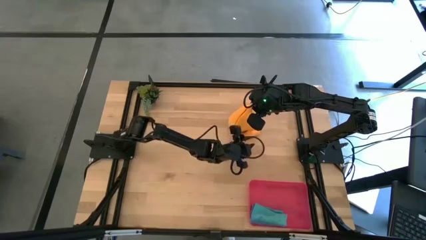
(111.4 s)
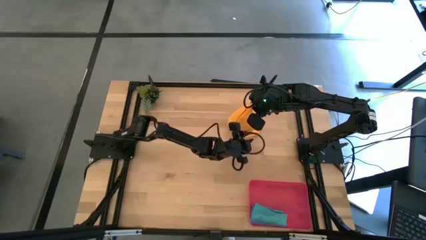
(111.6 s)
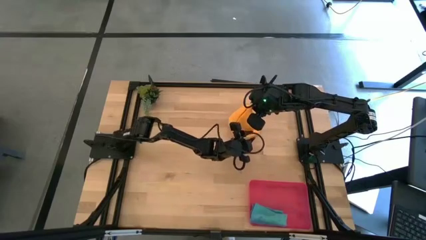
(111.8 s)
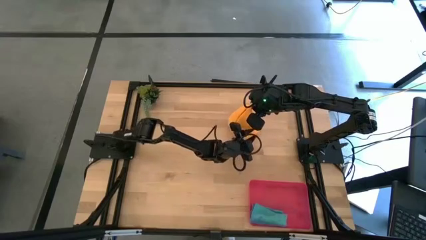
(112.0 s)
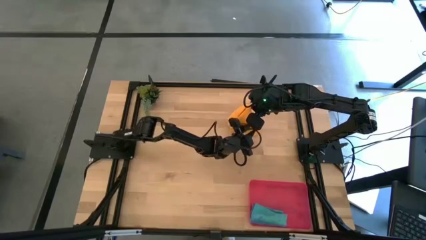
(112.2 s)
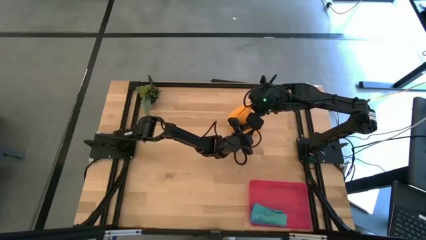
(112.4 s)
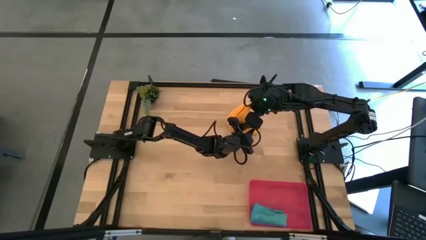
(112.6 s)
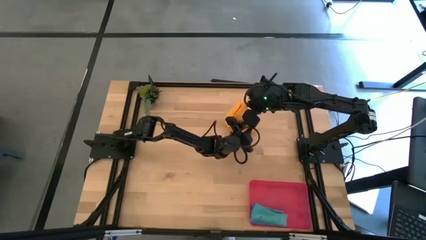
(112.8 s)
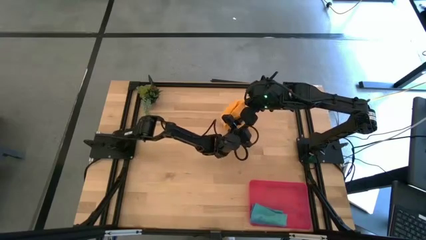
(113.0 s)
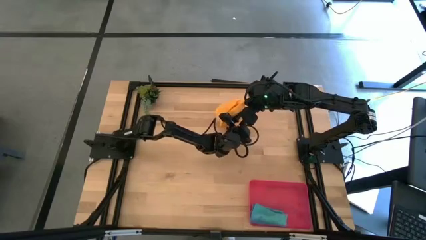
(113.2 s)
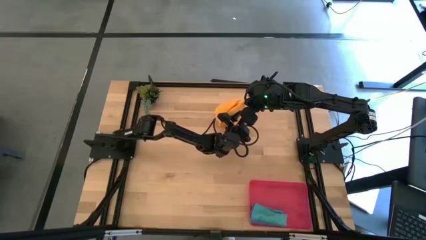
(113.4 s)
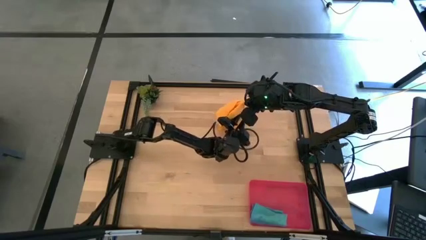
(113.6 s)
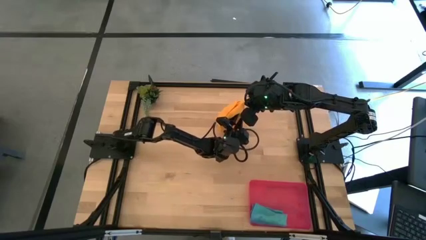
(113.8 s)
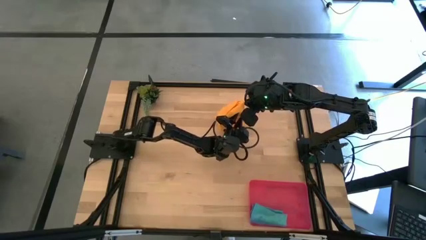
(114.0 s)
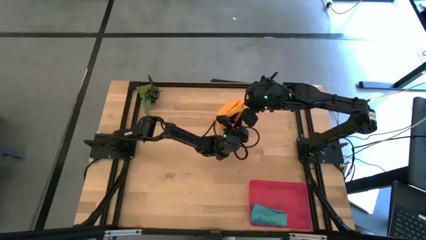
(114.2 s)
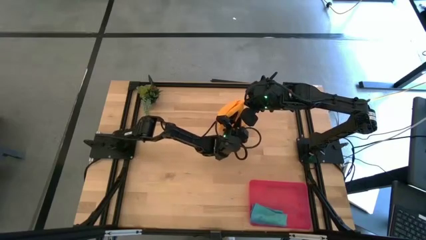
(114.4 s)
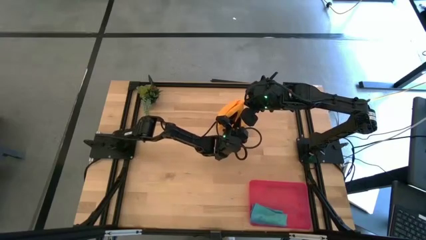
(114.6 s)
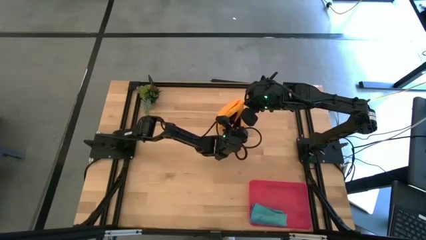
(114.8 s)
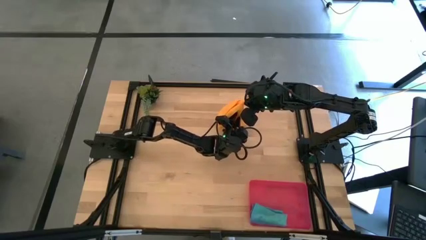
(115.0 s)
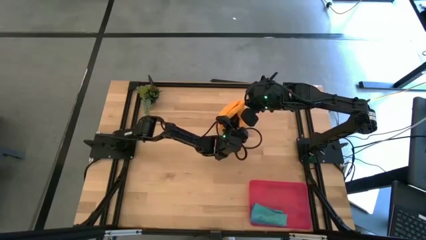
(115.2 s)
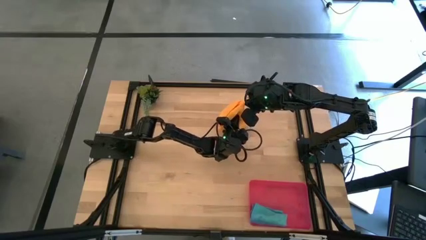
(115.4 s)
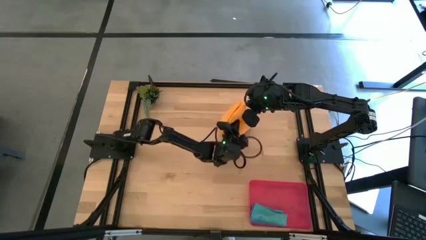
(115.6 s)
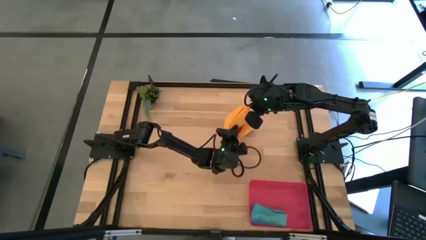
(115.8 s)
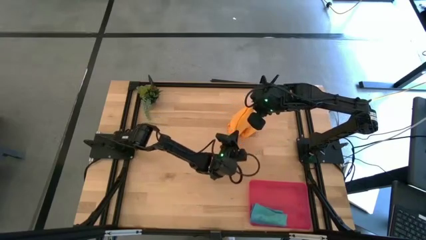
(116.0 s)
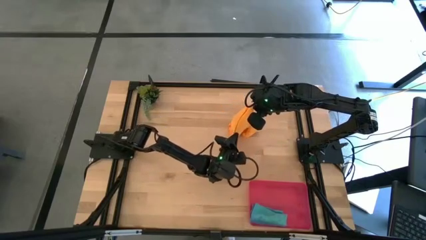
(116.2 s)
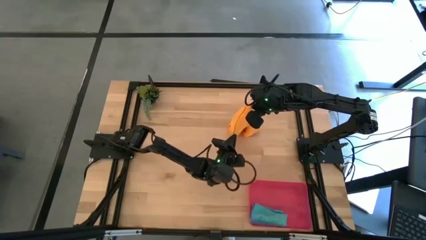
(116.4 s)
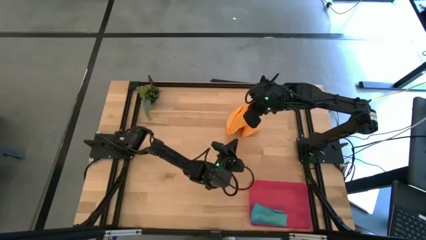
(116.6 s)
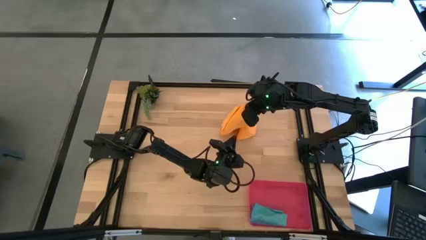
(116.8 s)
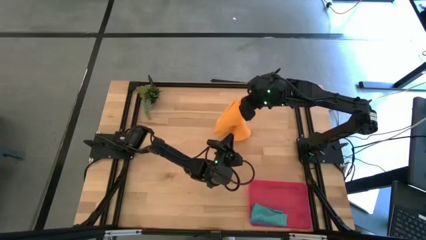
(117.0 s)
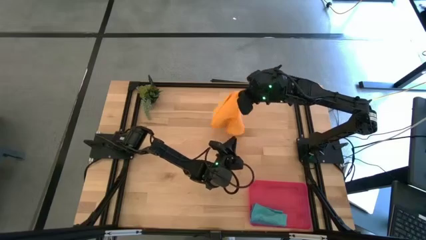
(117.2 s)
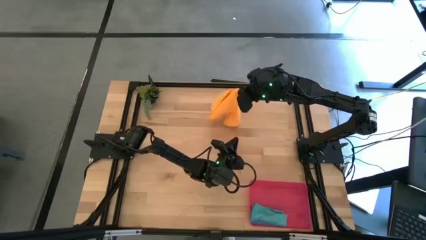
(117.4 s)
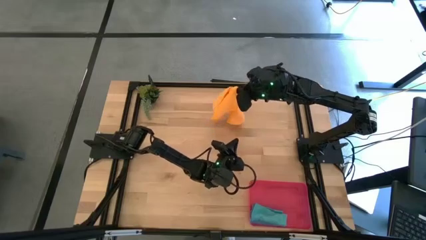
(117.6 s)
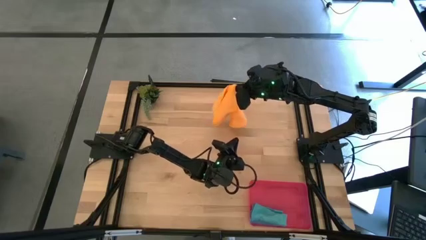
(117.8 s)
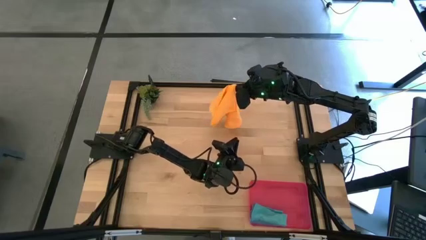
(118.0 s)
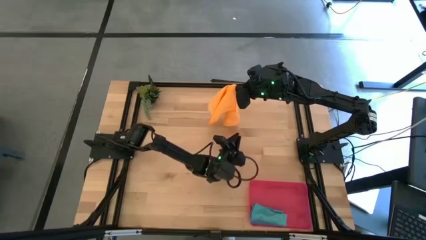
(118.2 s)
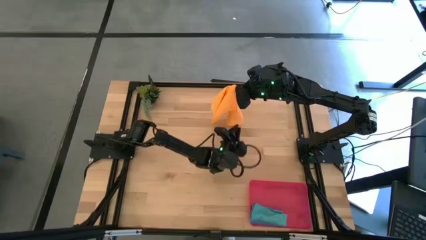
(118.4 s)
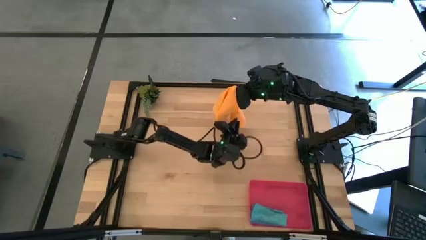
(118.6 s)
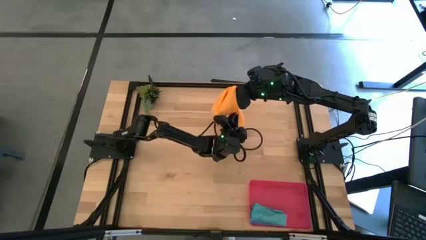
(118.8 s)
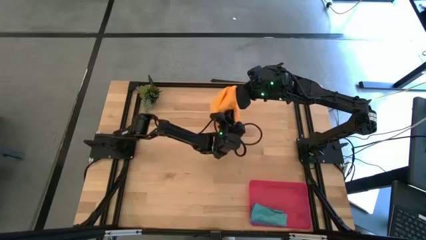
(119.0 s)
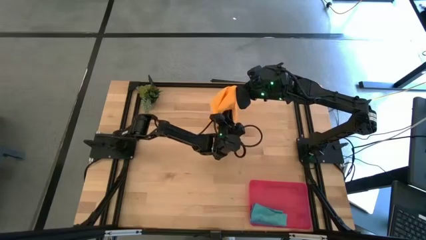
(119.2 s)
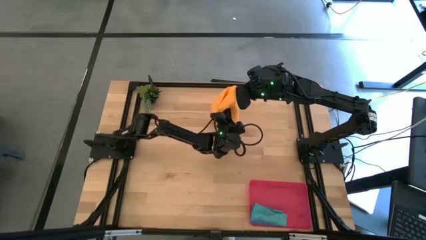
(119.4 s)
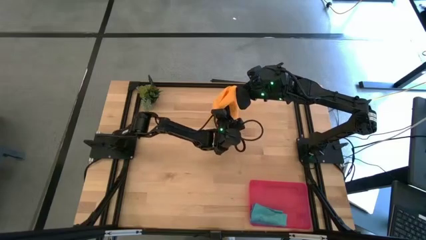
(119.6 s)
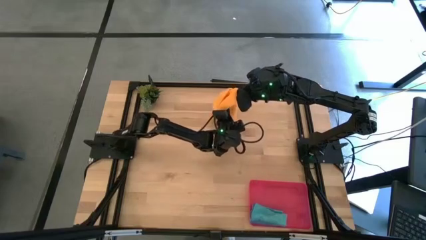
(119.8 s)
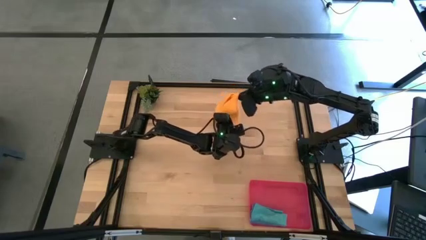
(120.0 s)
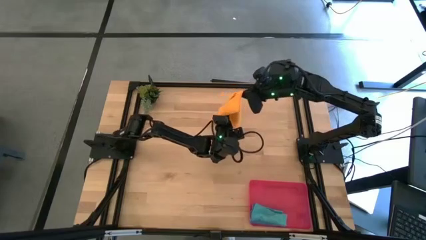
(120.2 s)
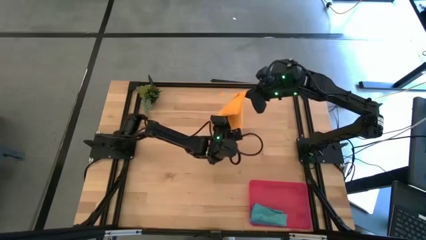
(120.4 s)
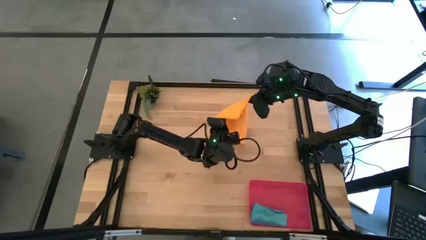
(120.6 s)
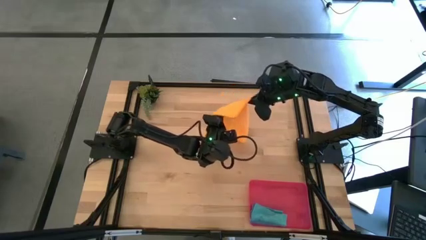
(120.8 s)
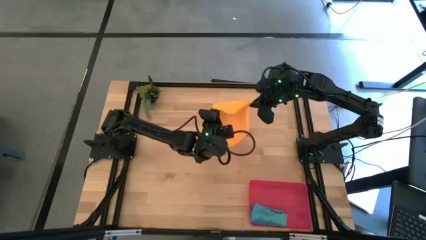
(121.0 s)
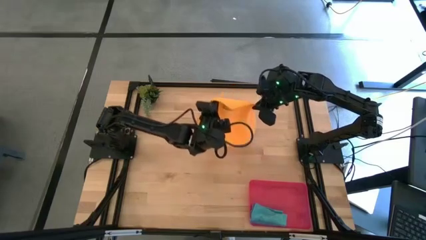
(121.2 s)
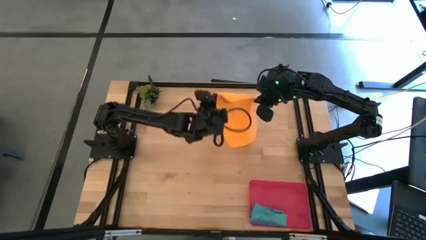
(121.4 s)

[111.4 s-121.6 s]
Task: Roll microfiber towels into tight, uniform cylinder then place into a basket
Fold the orange microfiber cloth

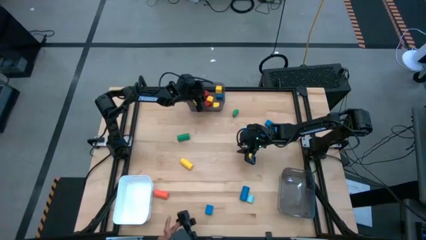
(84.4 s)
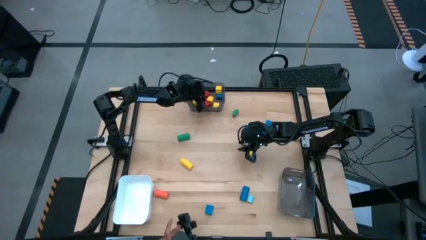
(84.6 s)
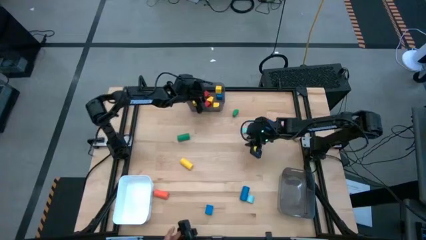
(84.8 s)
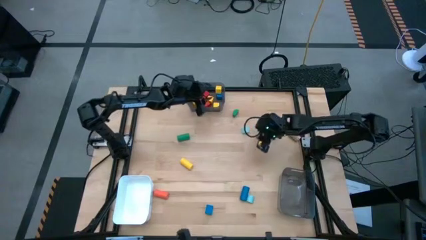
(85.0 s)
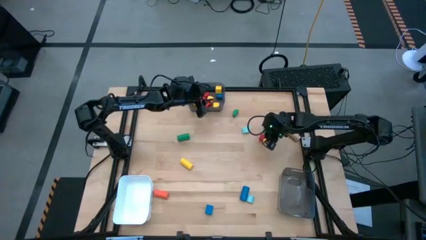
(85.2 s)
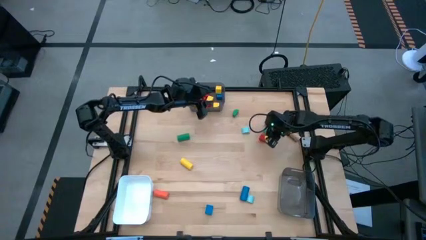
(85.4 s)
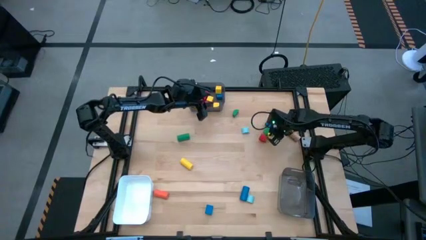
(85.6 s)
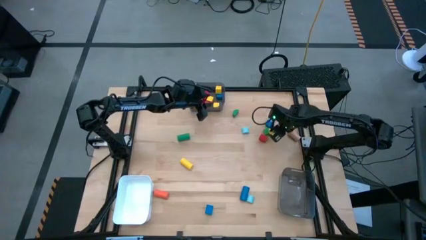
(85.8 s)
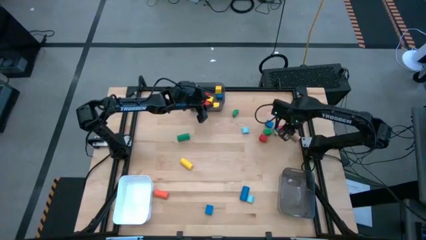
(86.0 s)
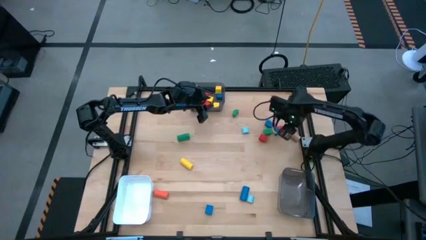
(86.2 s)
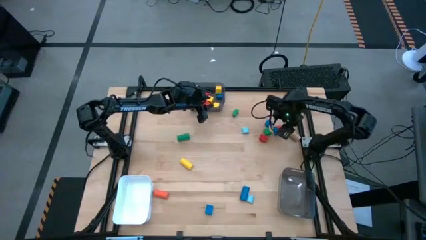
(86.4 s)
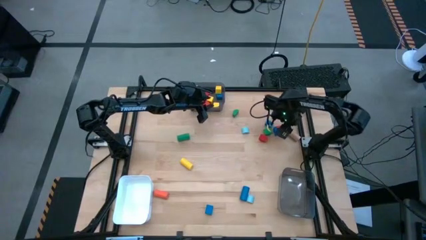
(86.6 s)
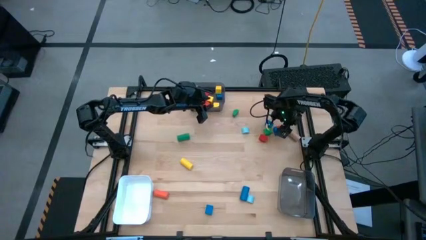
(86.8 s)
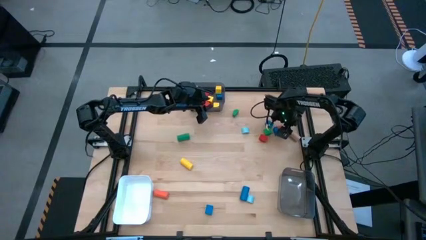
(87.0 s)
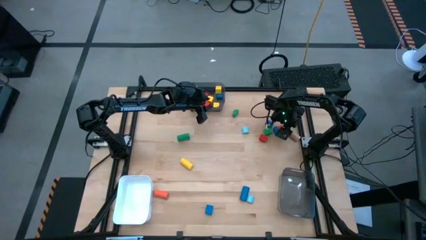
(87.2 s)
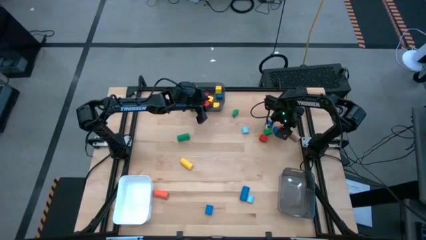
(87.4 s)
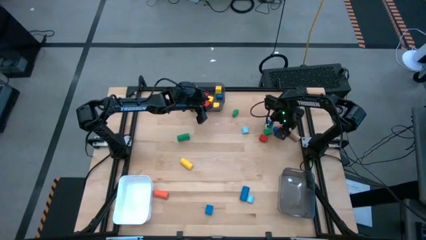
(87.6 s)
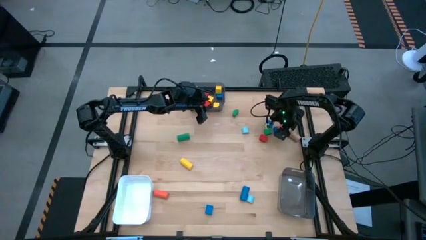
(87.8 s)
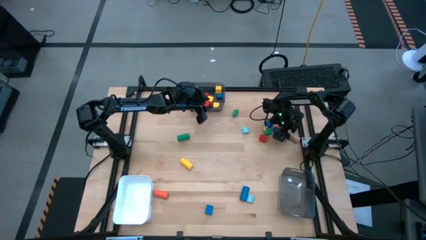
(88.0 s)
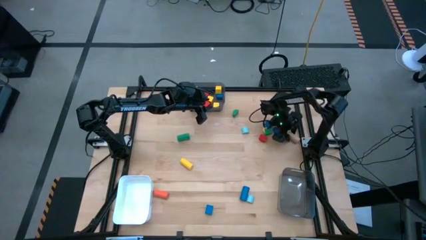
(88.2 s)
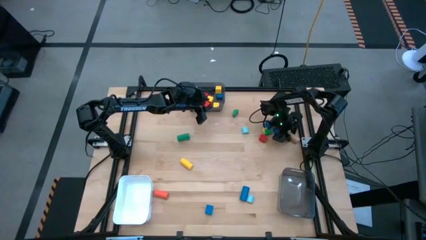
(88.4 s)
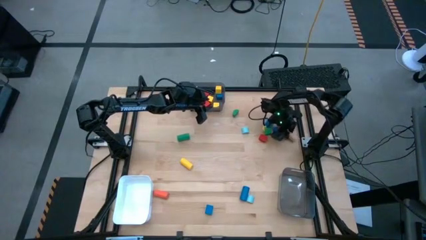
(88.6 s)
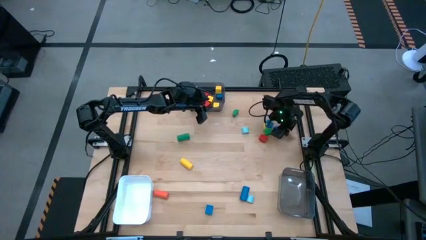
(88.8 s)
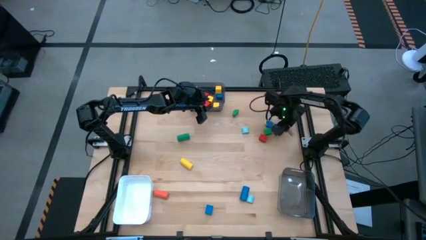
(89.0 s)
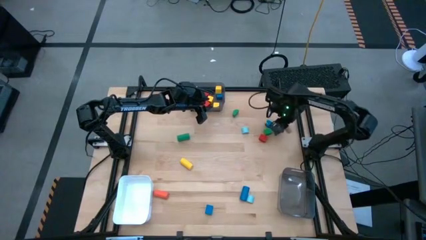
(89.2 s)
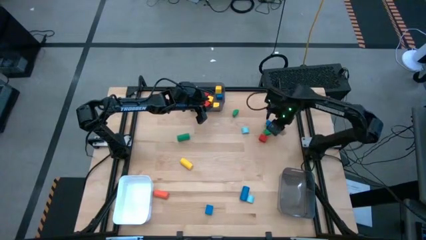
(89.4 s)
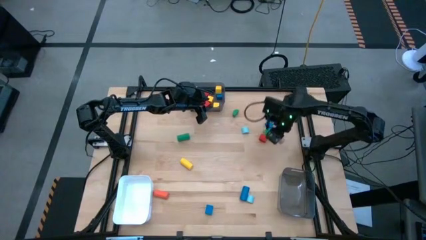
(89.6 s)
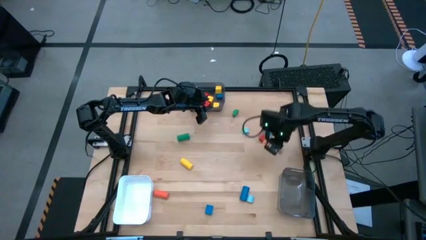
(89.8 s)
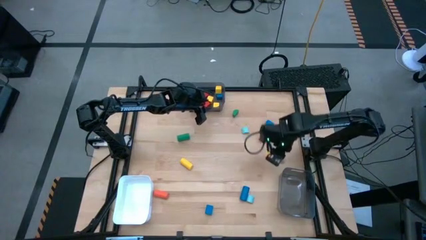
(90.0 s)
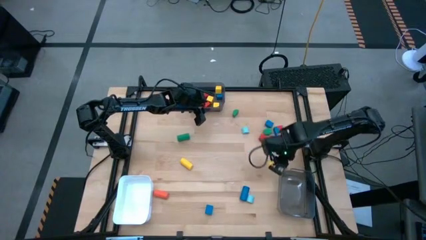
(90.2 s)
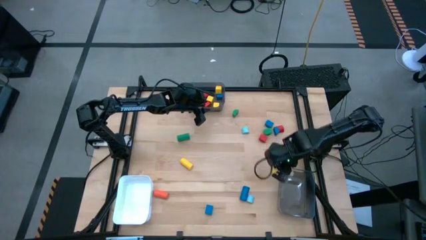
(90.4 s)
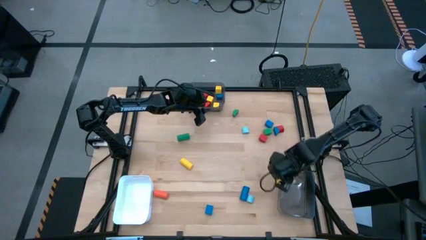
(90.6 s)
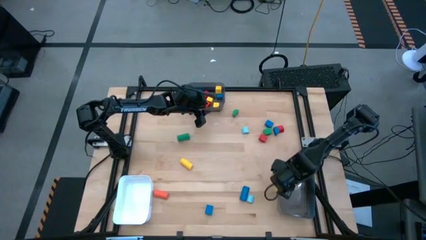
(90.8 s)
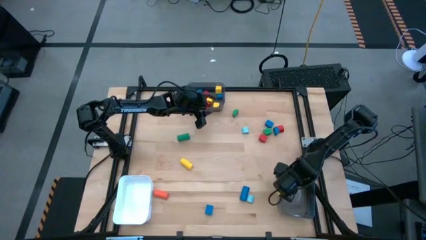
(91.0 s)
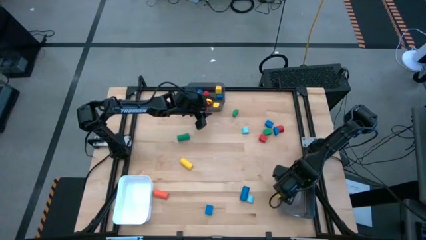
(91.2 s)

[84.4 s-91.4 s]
Task: Sort blocks by size
Put the brown cylindrical block into the bottom black bin
